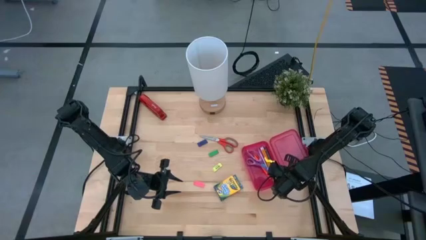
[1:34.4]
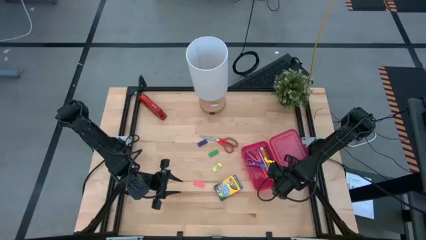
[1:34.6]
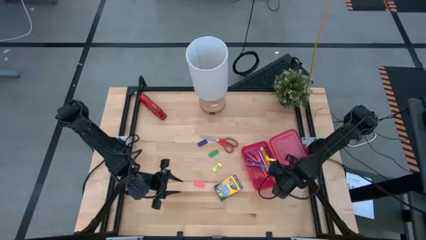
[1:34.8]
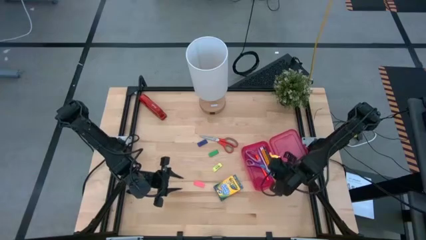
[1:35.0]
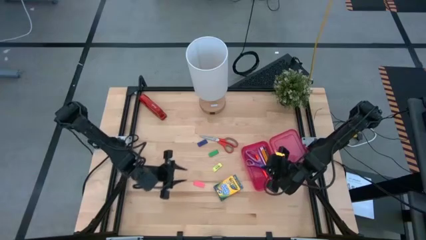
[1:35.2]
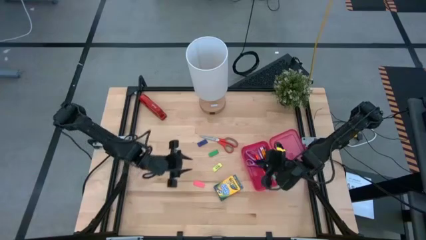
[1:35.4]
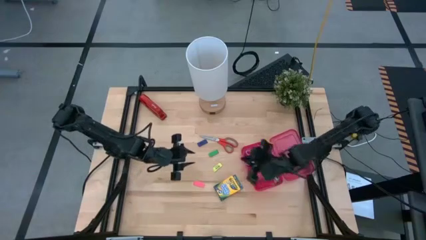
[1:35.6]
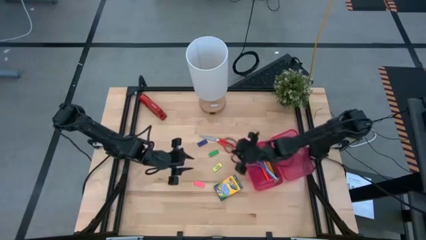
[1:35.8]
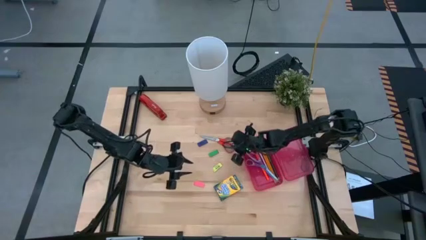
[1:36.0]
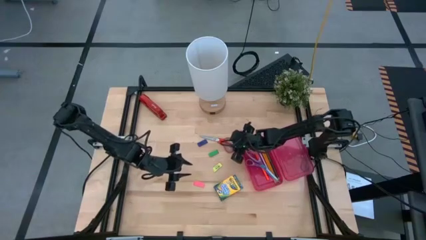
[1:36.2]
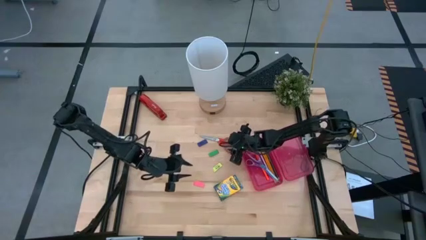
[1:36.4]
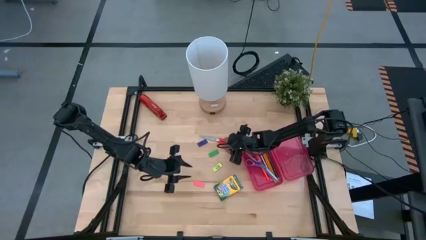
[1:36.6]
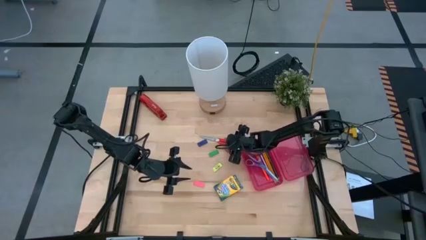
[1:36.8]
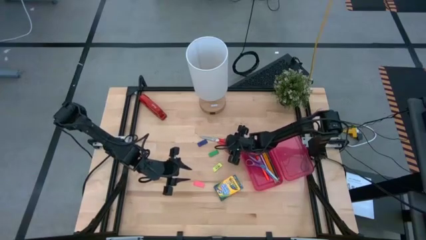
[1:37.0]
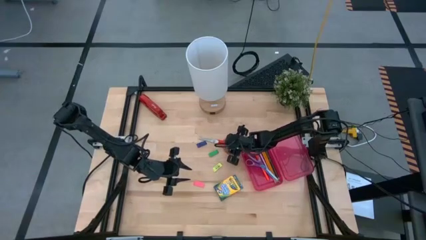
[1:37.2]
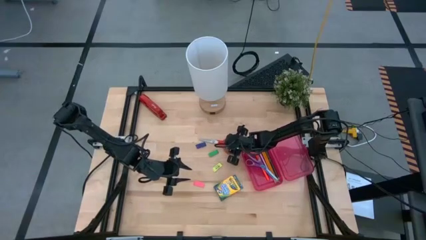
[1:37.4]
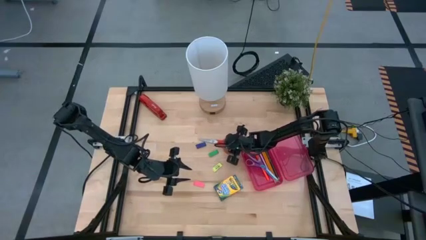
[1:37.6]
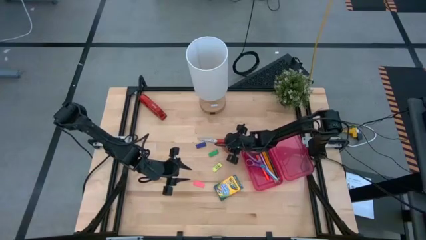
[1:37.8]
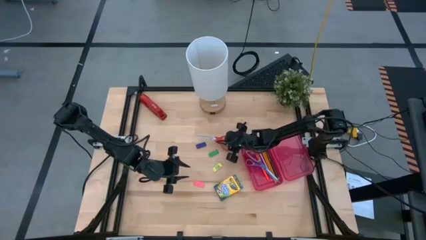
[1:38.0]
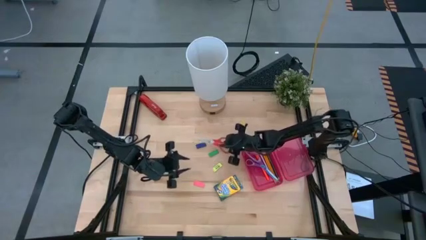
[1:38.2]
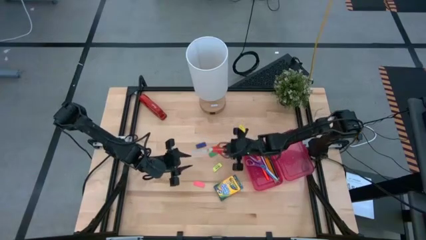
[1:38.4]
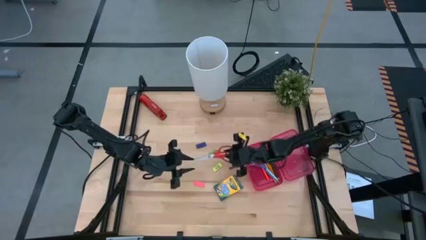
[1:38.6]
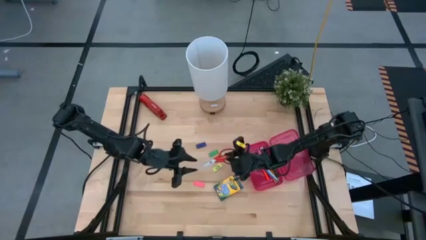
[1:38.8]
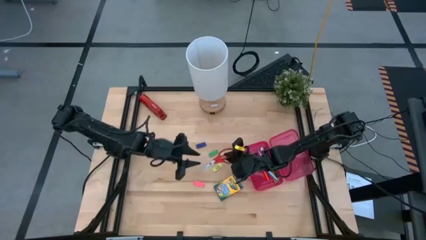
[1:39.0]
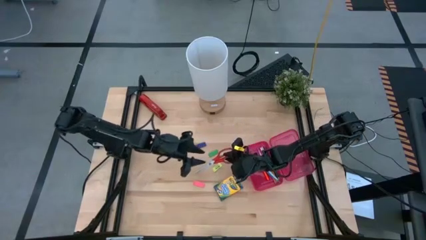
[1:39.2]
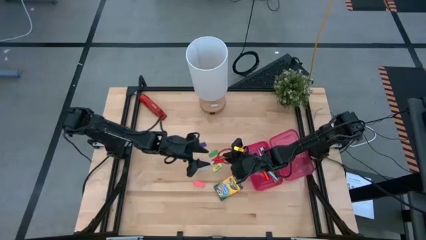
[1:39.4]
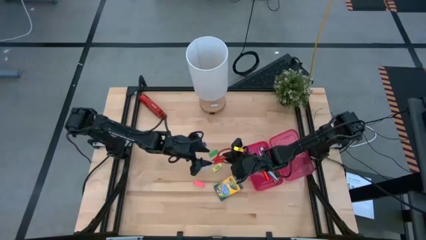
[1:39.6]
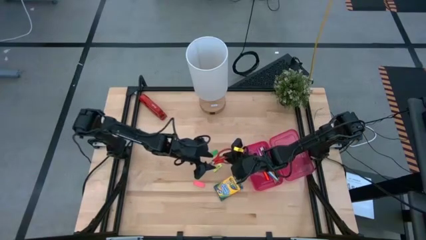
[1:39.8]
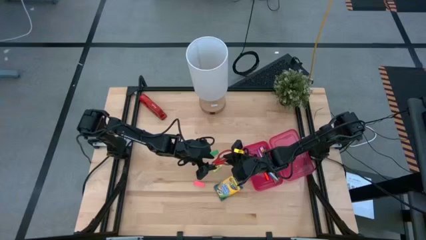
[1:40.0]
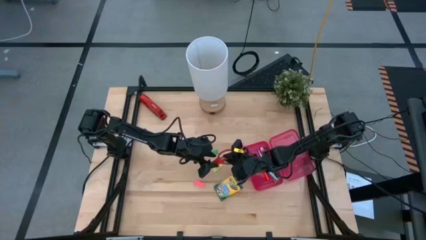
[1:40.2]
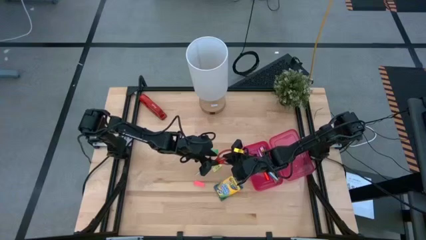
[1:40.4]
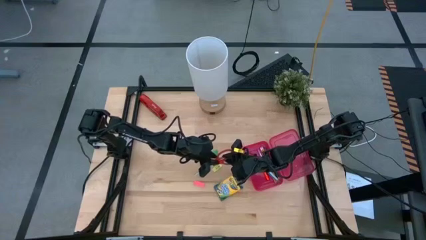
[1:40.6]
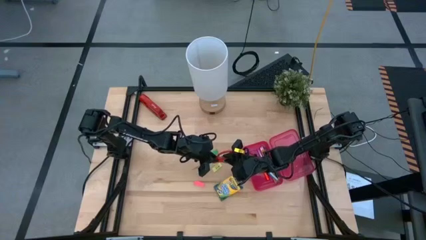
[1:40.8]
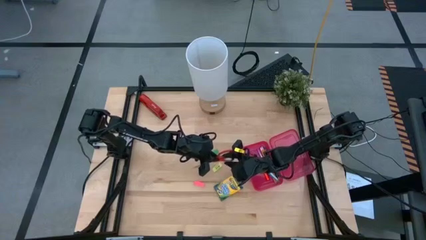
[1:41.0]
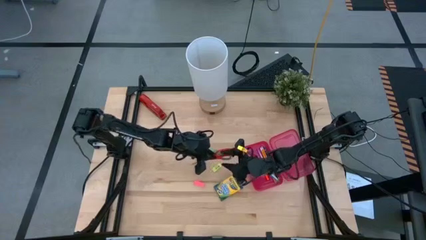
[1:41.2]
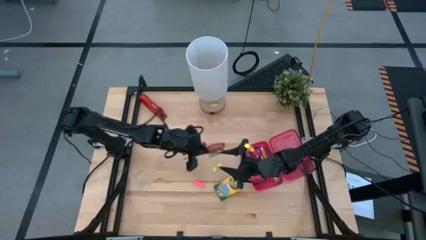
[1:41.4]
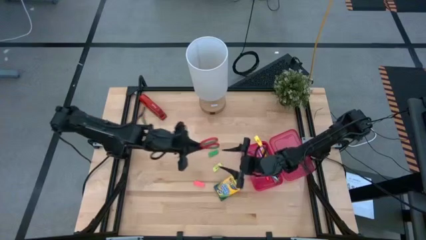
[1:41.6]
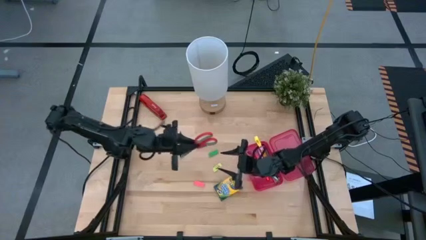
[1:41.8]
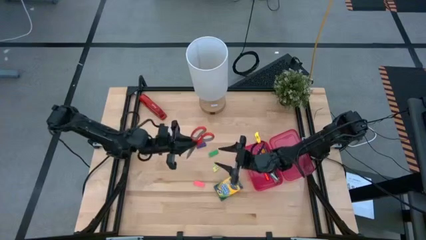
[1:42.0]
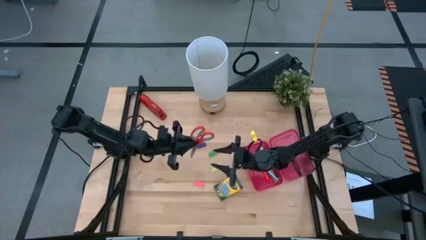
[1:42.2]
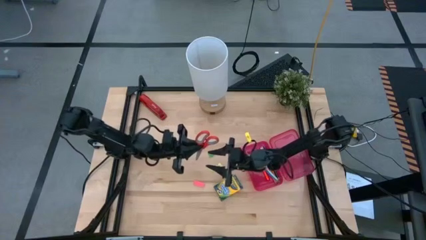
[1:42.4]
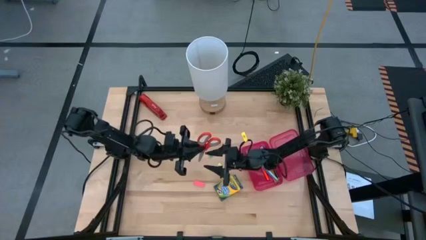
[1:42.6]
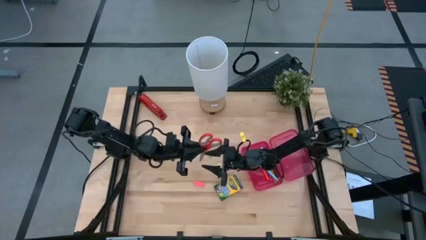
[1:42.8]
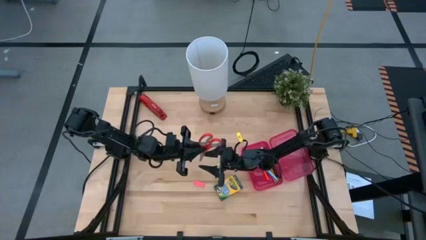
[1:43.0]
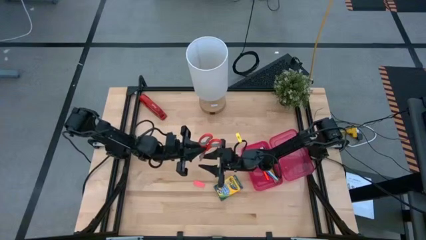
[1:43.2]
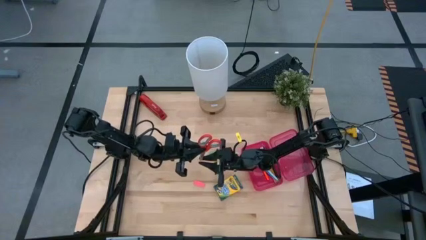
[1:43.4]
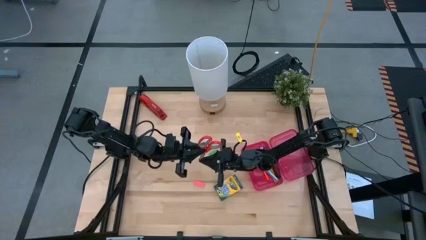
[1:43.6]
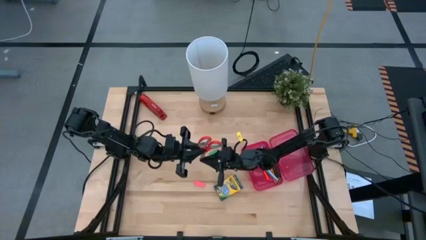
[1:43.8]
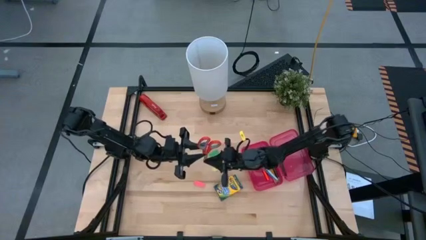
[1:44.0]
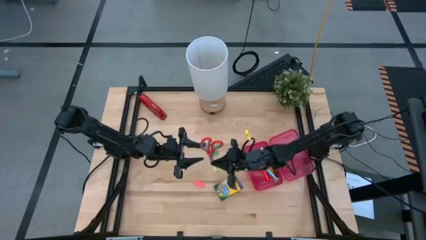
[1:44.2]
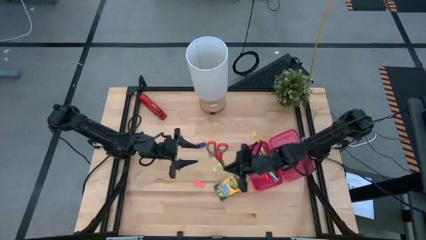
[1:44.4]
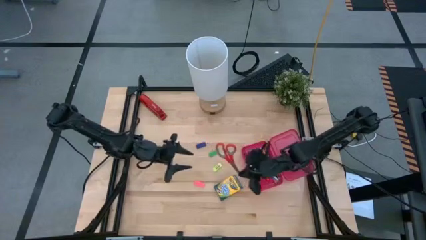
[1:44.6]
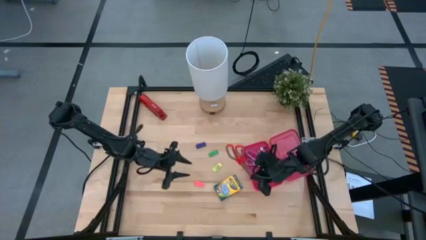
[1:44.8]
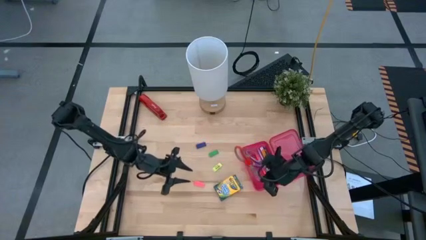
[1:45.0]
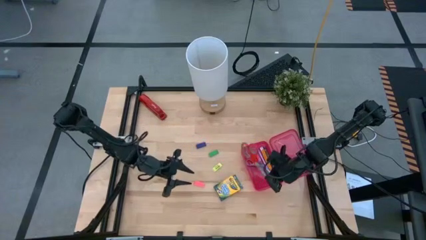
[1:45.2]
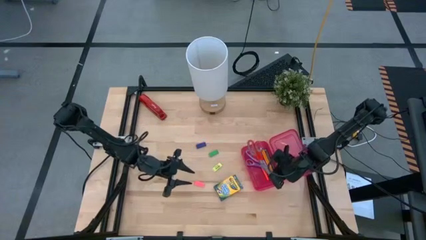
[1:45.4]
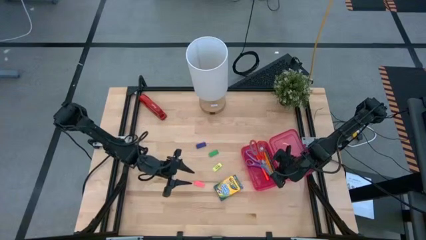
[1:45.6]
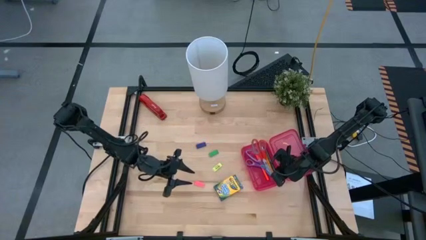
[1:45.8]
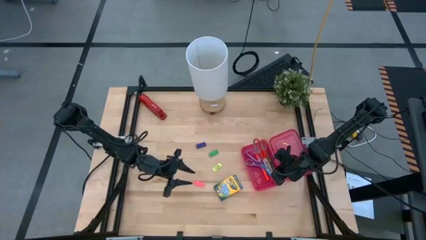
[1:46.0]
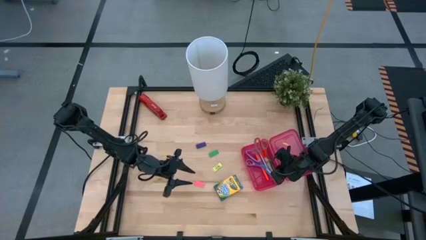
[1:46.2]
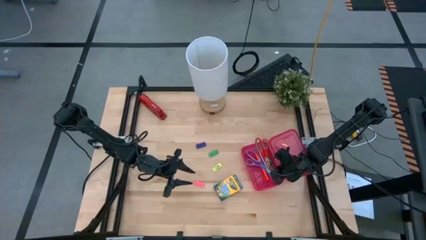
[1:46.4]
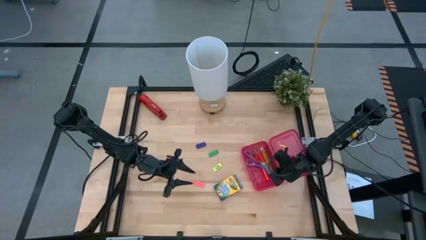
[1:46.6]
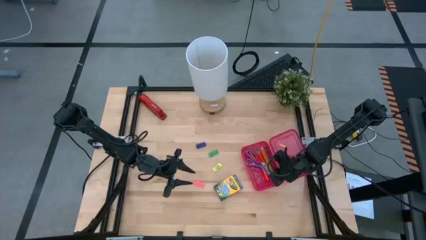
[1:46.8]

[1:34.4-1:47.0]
Task: Pack school essentials
Put the orange scissors into the pink supply box

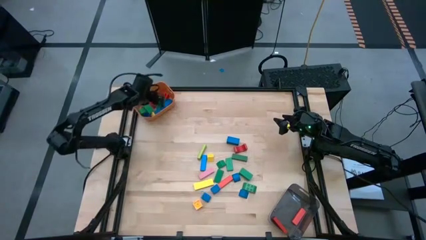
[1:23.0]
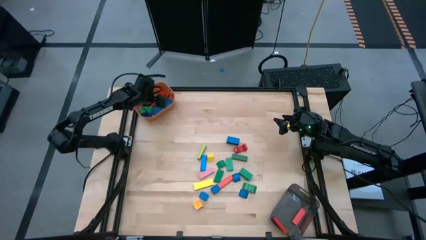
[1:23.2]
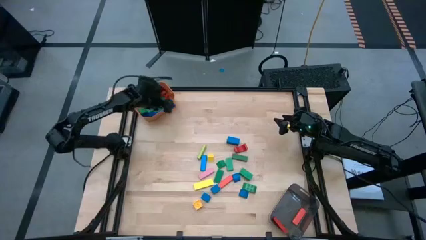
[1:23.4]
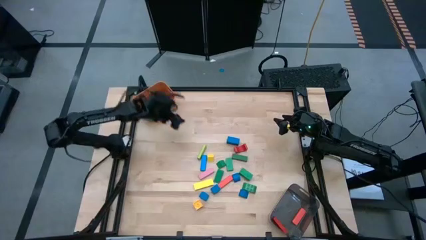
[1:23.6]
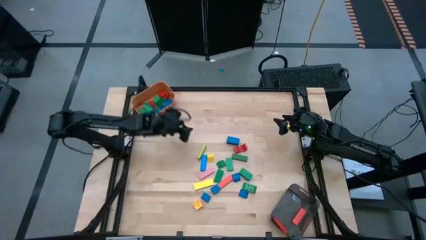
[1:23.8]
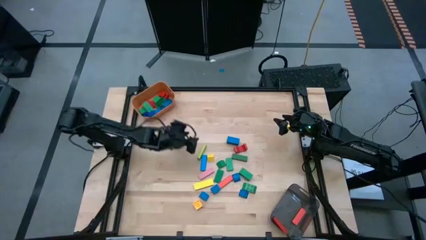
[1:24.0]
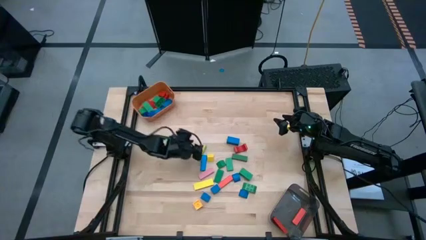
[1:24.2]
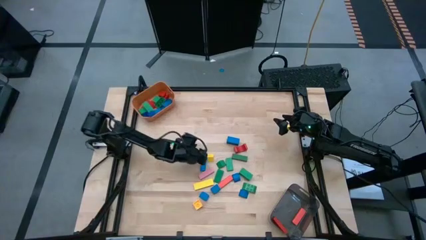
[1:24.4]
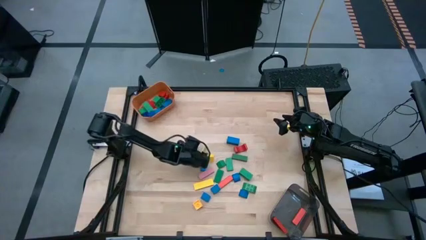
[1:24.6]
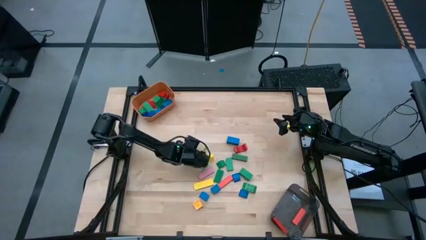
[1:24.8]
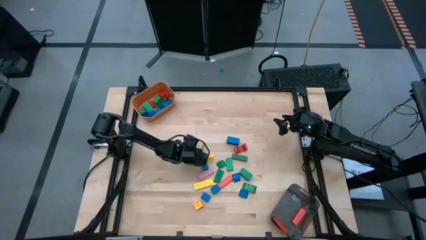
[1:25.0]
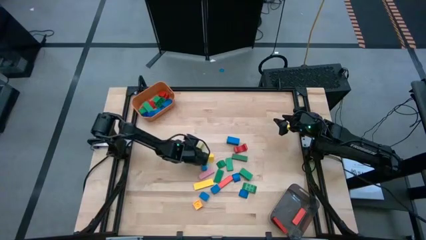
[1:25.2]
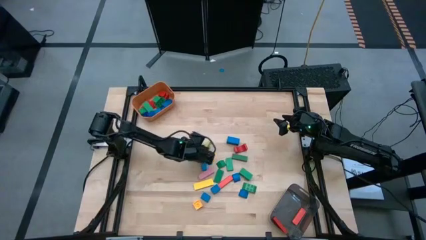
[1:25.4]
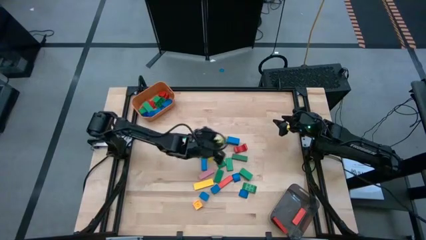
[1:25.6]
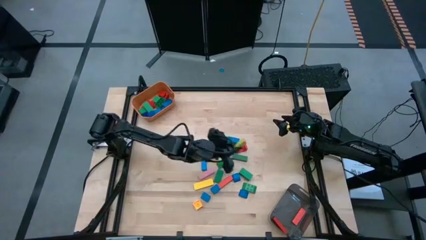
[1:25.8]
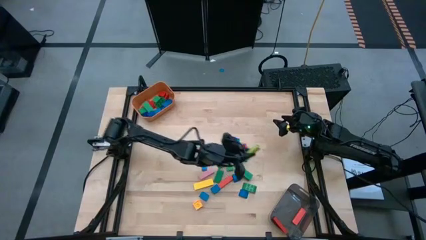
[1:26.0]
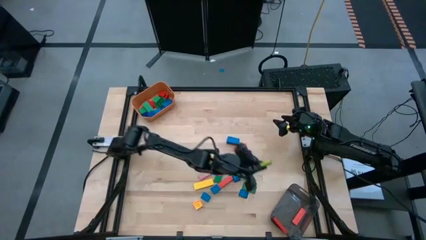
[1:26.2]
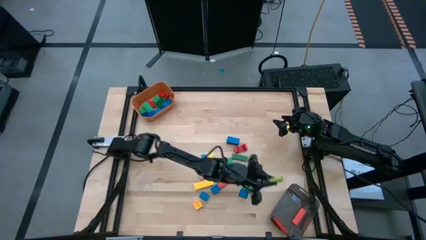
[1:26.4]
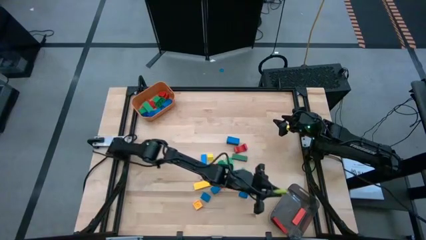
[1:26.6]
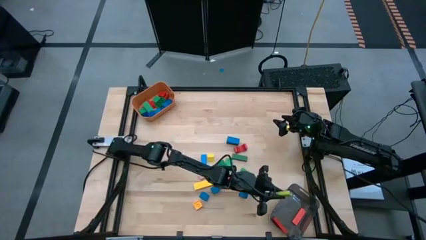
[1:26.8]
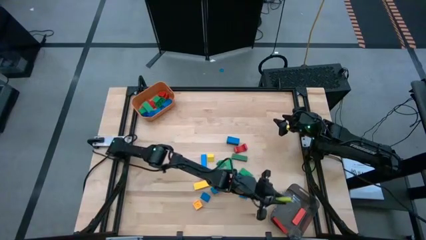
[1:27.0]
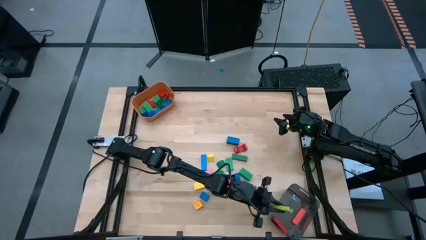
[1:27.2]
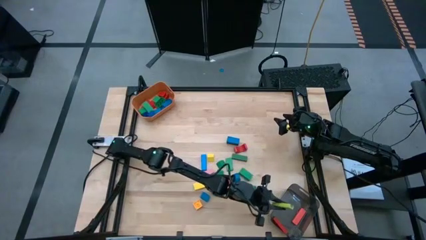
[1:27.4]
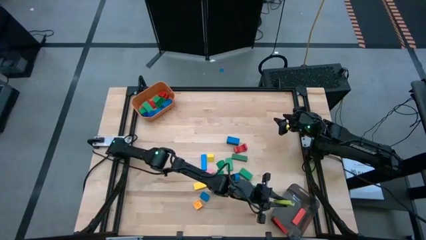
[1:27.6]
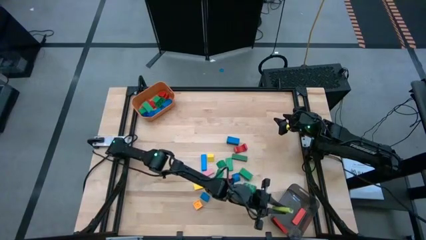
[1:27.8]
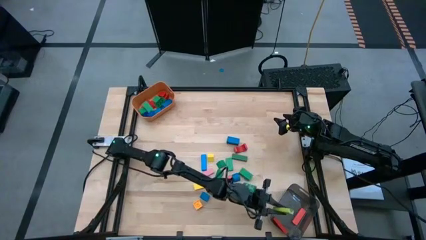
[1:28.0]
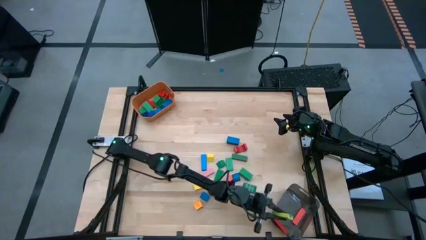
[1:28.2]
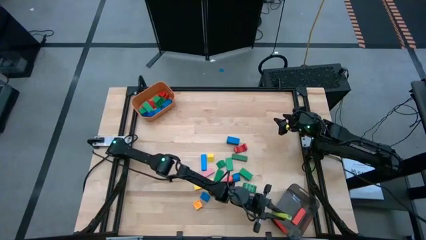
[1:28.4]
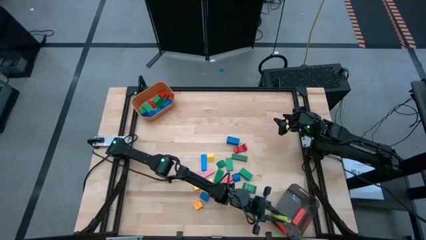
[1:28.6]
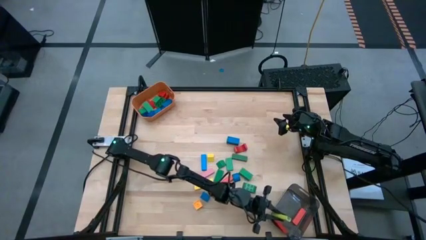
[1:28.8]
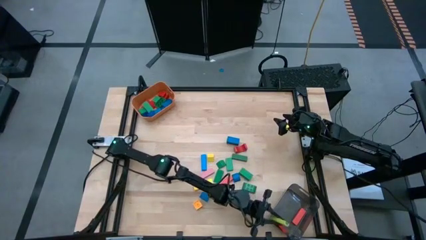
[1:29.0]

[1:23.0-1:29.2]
Task: Sort blocks by size
Put the big light green block into the black bin
